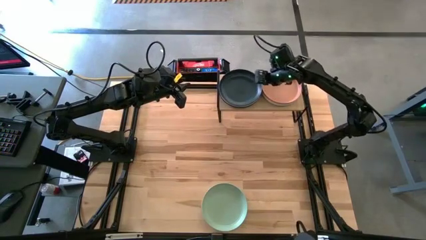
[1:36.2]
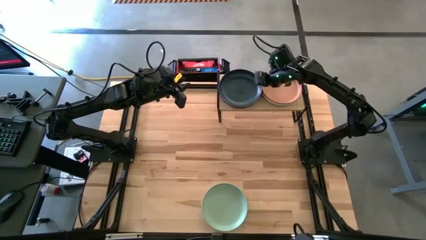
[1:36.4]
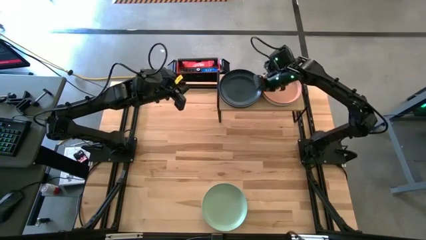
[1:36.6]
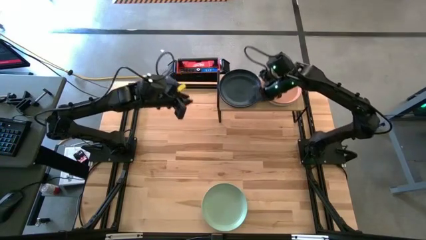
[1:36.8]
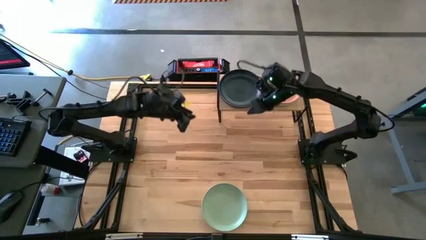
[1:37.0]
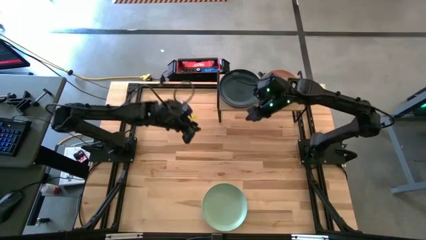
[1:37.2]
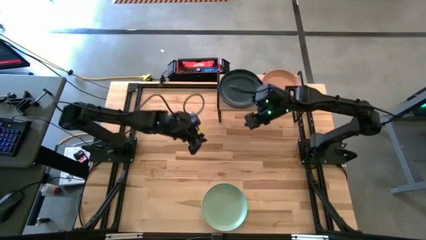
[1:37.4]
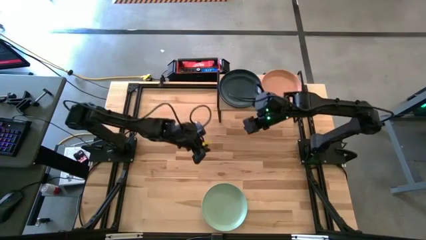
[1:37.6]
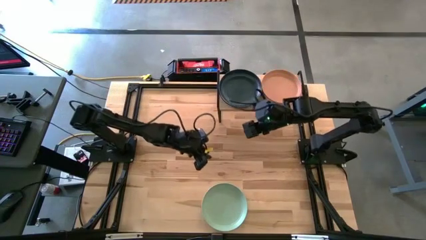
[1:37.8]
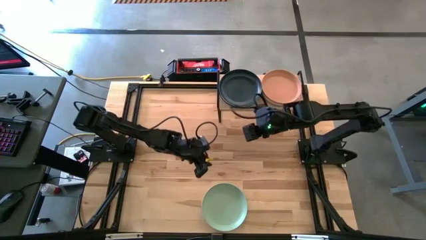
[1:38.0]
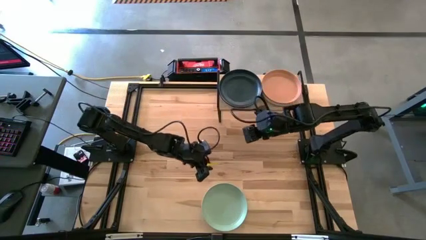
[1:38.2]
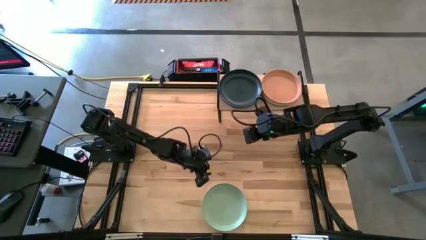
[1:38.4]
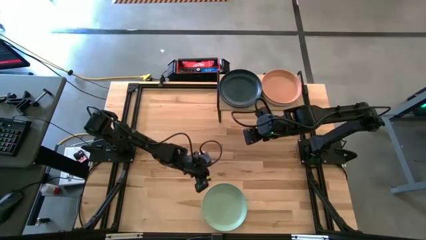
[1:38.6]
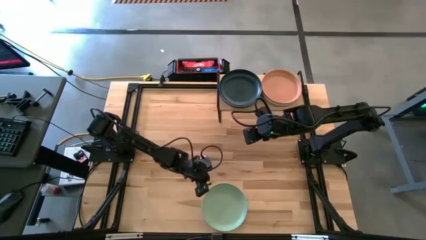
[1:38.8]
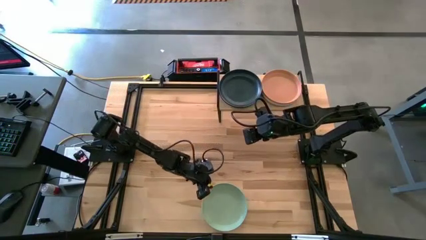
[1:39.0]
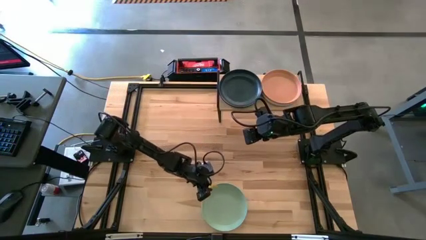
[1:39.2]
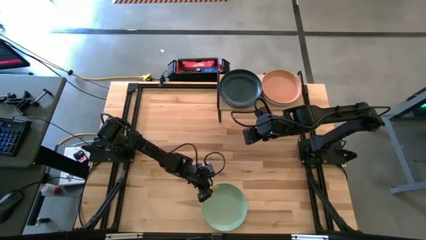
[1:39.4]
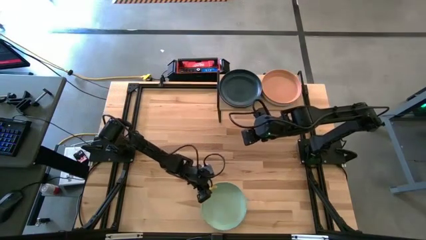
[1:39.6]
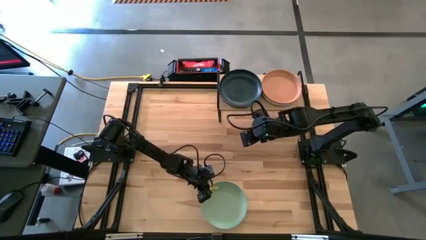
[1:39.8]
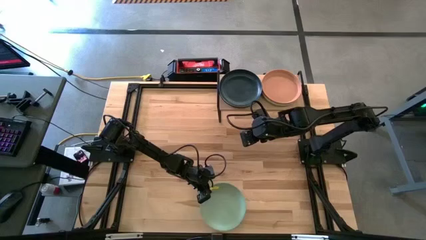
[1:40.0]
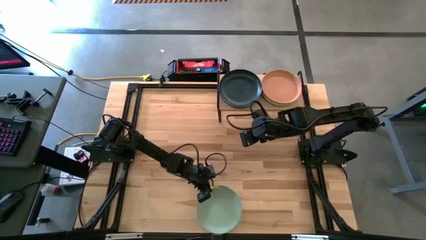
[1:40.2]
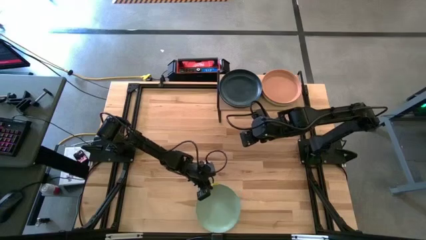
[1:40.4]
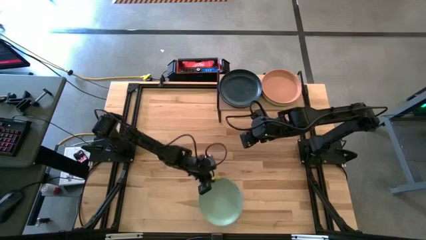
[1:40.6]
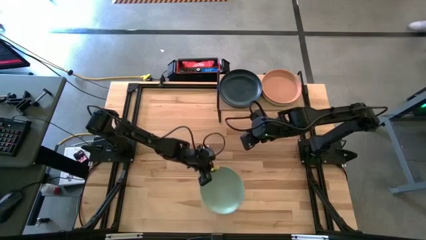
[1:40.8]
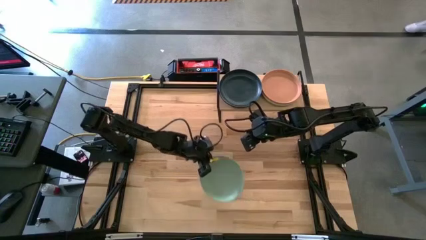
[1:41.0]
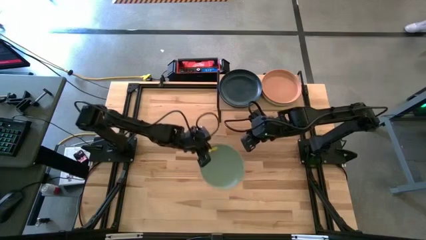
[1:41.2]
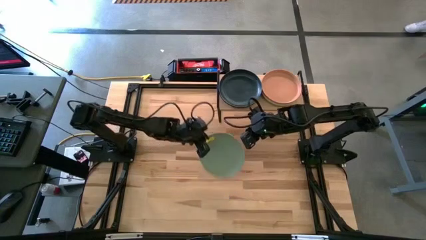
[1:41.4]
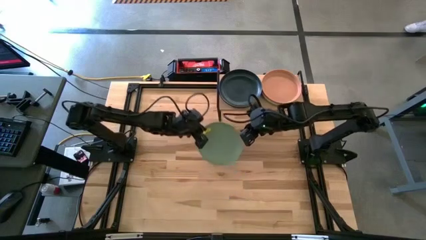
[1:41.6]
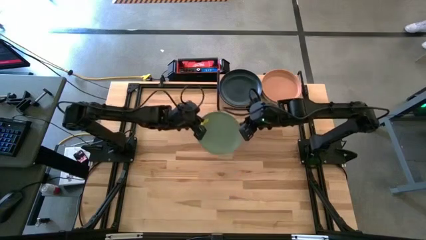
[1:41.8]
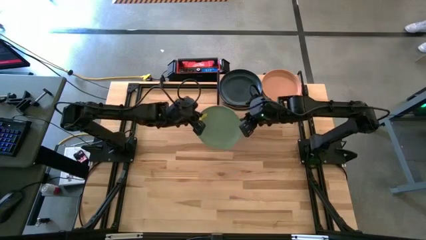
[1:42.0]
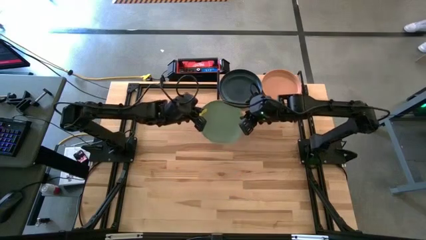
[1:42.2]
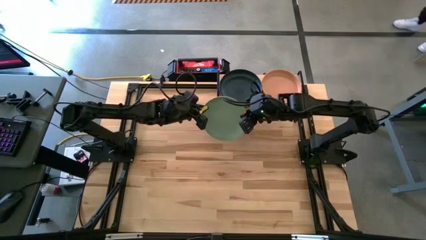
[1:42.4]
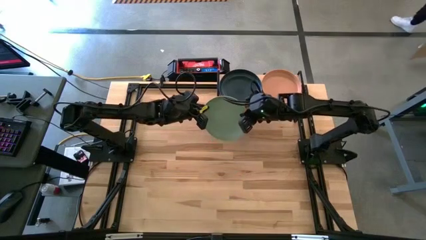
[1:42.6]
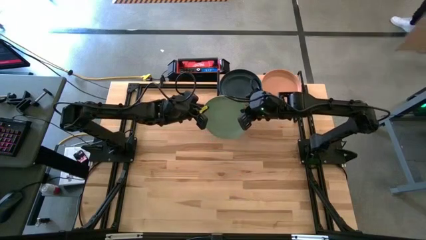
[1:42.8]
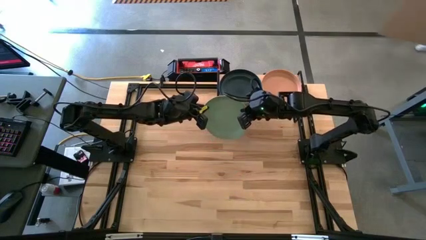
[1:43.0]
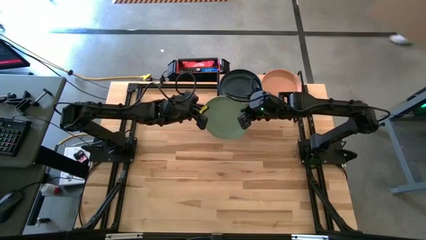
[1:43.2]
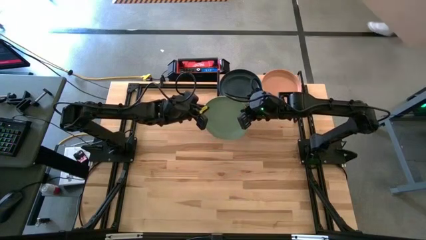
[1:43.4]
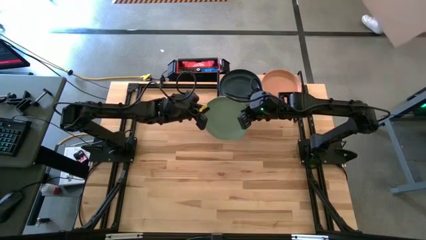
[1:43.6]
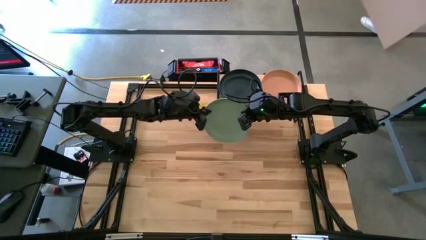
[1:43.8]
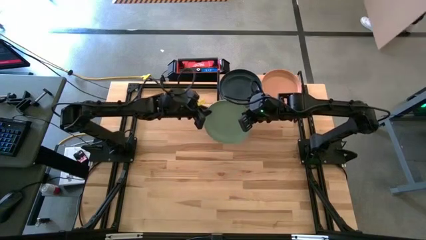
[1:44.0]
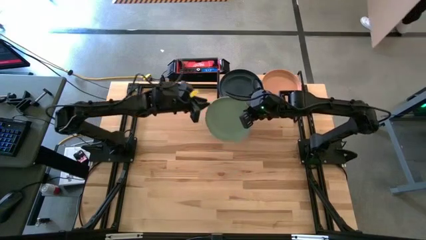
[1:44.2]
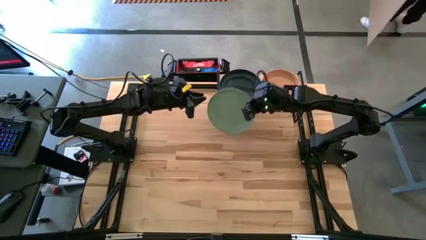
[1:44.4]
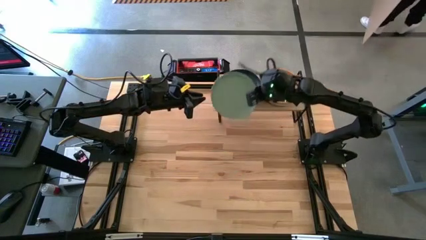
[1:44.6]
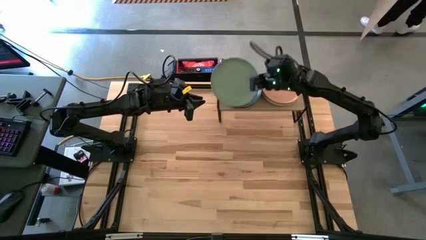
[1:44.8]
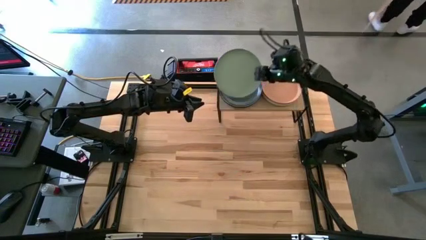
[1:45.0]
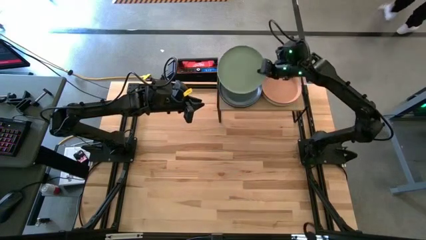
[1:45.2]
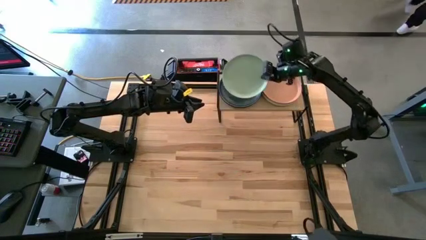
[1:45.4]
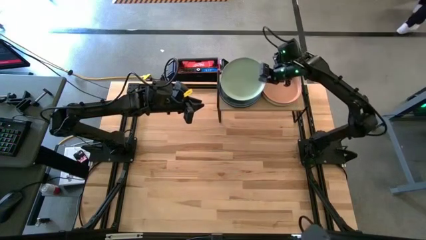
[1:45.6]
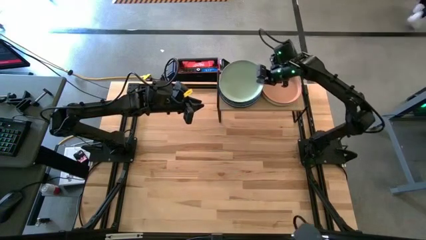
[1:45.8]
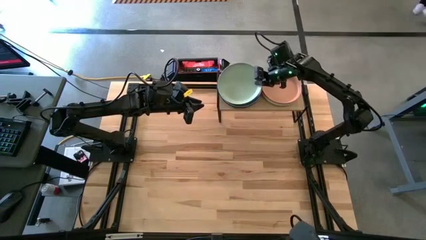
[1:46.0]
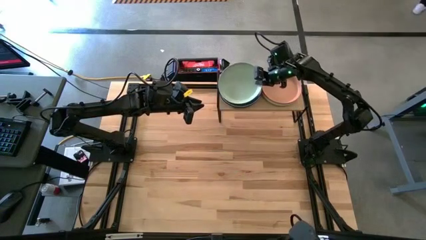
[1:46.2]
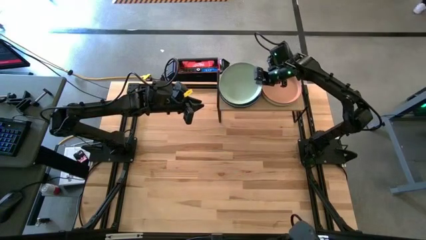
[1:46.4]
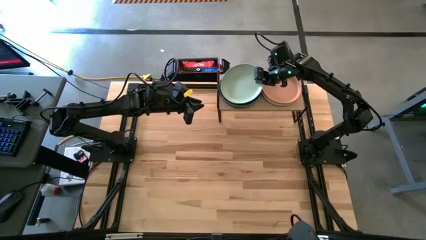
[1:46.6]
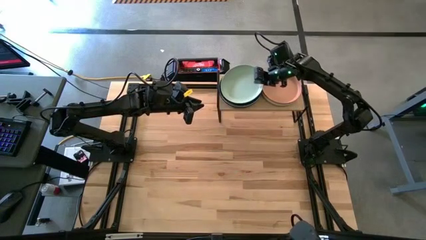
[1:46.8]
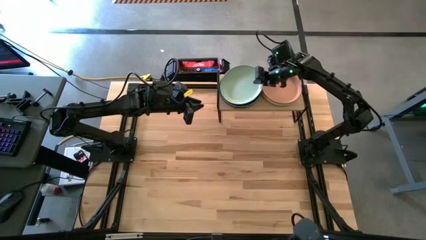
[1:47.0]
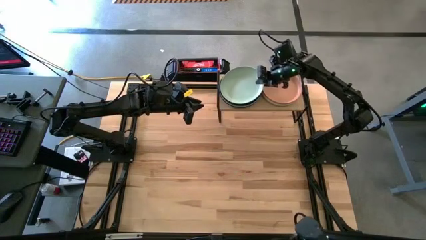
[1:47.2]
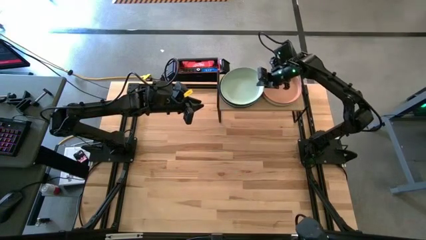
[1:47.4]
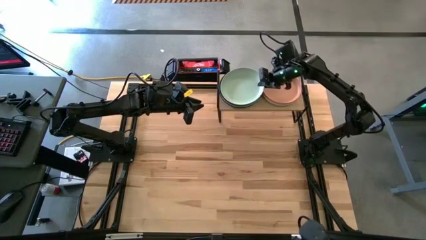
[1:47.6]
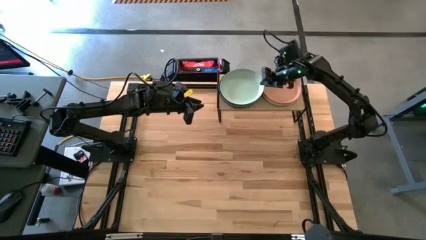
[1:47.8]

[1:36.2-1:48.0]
Task: Place and stack plates onto a shelf
Stack the green plate on top of the black plate on the shelf

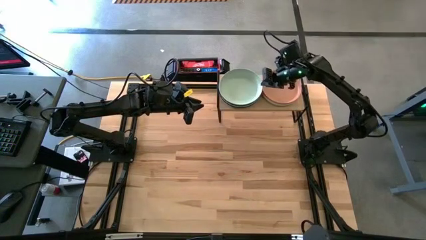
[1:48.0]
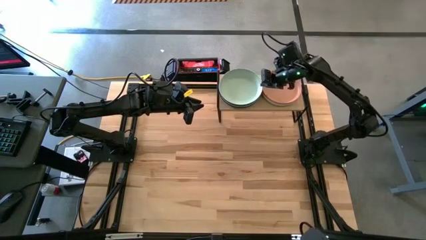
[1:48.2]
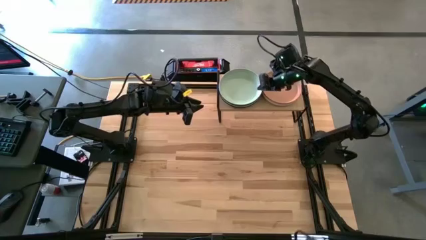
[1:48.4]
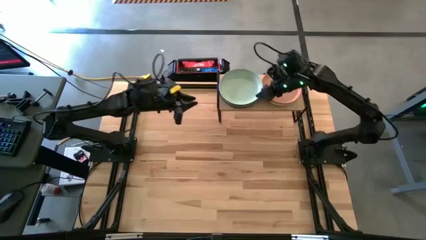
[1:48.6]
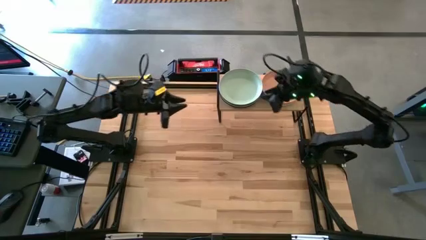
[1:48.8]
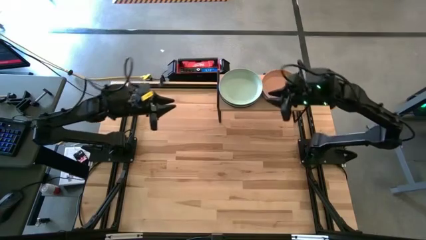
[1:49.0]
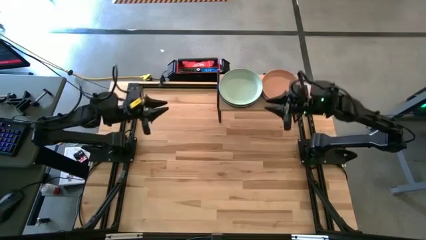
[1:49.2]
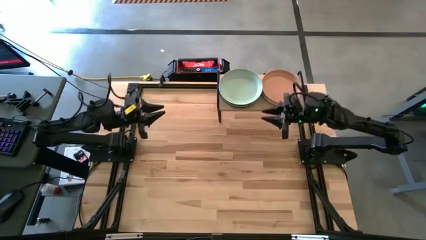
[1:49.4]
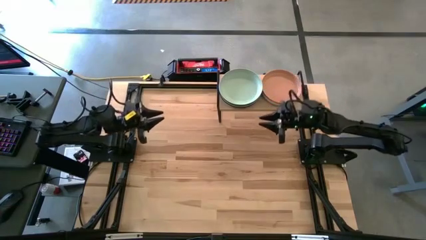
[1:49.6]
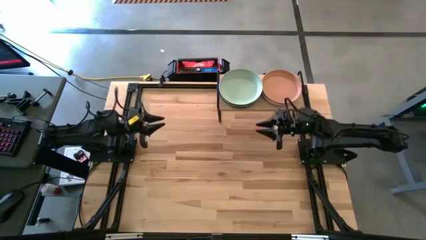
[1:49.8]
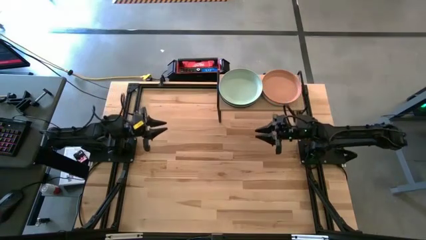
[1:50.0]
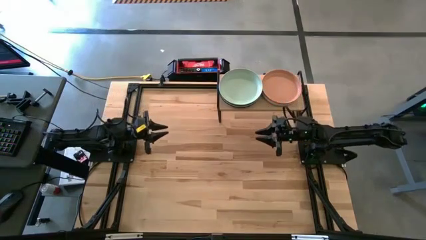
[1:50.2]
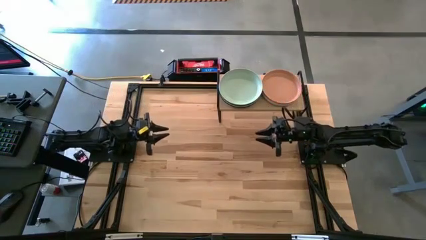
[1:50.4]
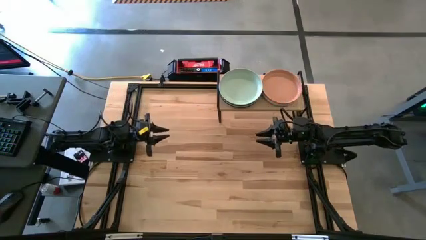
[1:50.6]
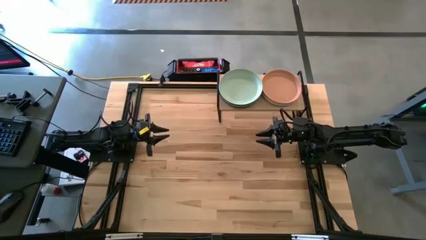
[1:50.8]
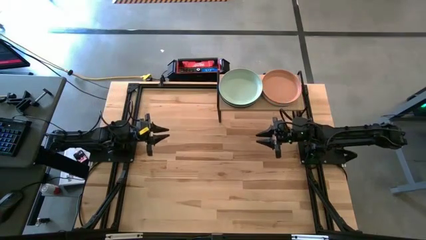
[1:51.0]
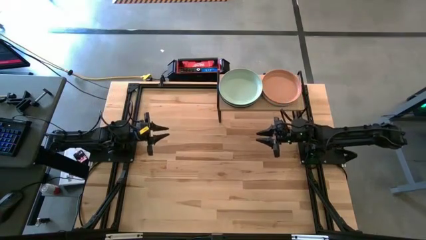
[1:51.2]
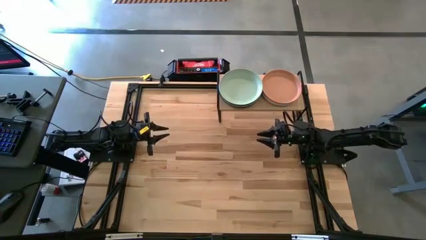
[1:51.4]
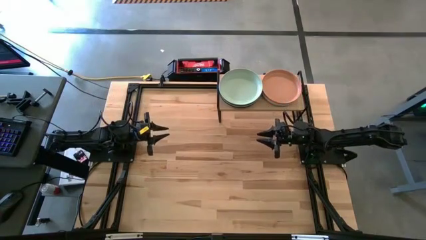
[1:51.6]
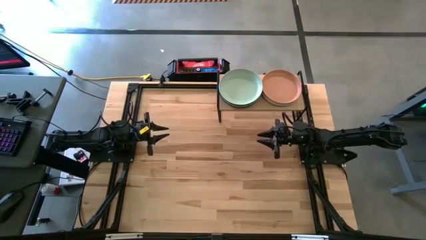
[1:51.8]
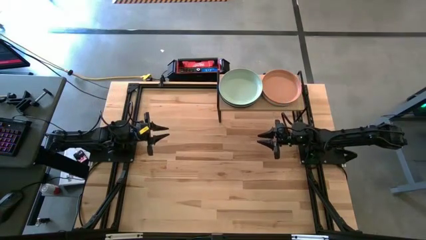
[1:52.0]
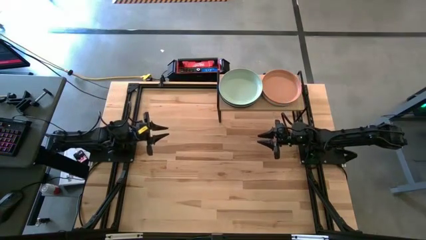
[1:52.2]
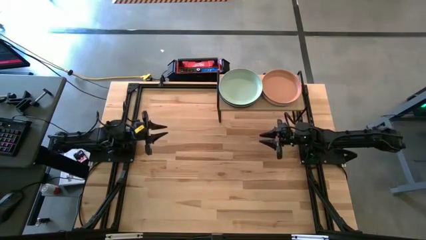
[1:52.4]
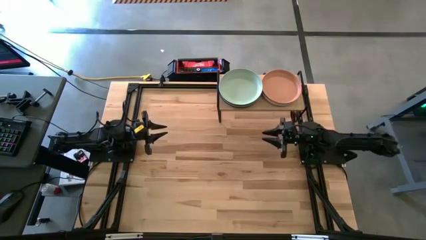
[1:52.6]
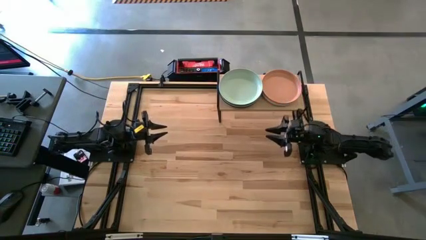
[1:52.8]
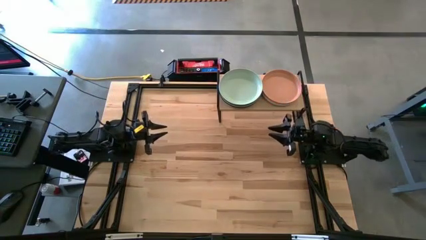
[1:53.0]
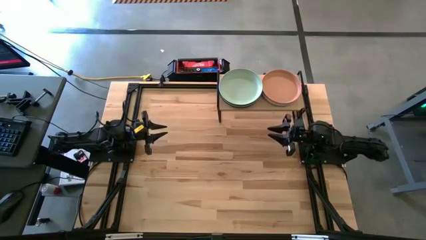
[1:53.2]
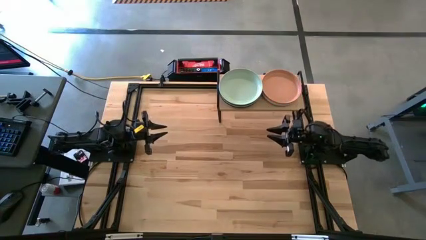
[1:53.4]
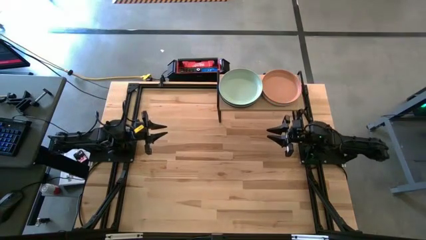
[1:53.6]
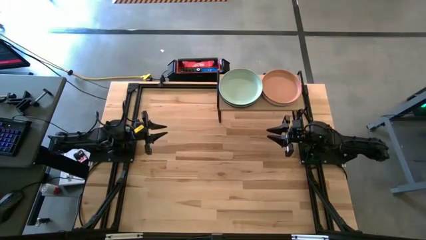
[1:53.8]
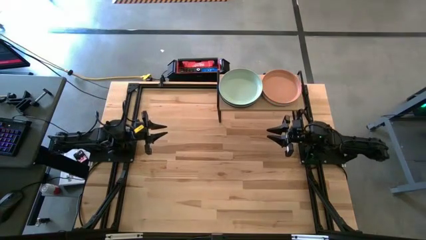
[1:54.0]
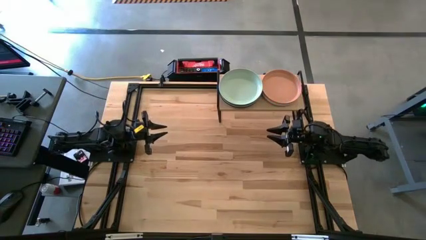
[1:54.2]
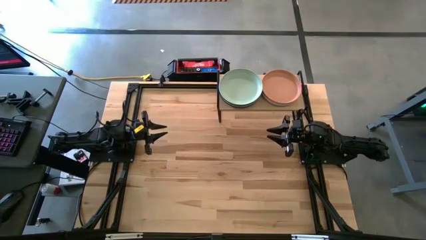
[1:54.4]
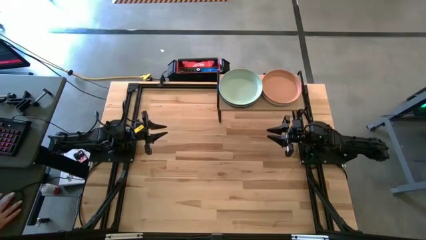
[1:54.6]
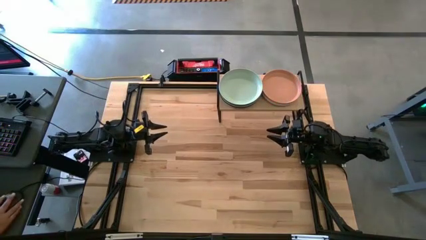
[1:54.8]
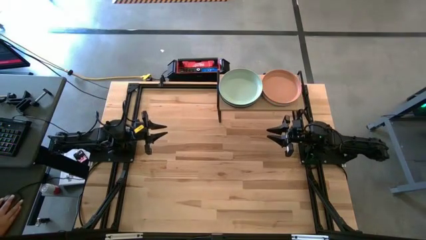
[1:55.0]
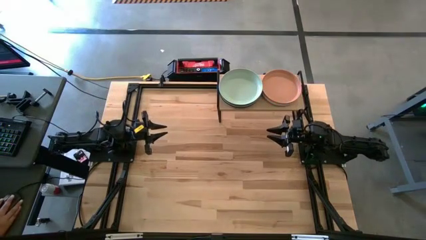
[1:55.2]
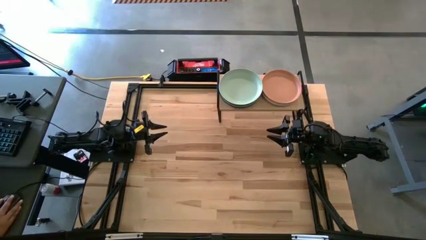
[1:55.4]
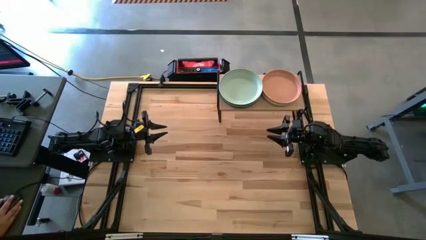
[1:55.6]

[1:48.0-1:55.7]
Return to Home Position
